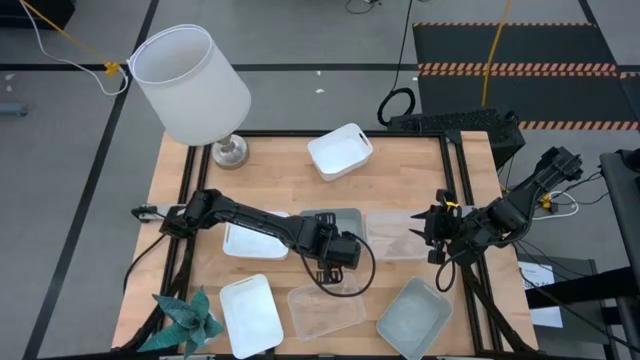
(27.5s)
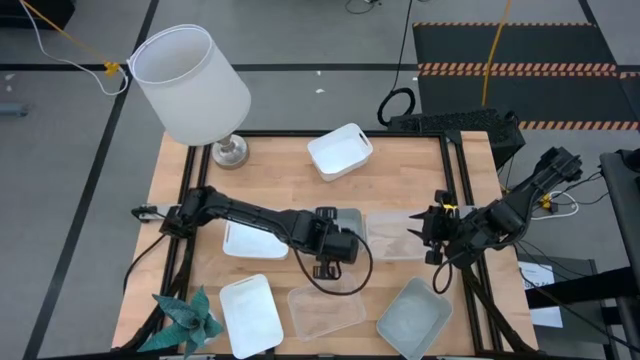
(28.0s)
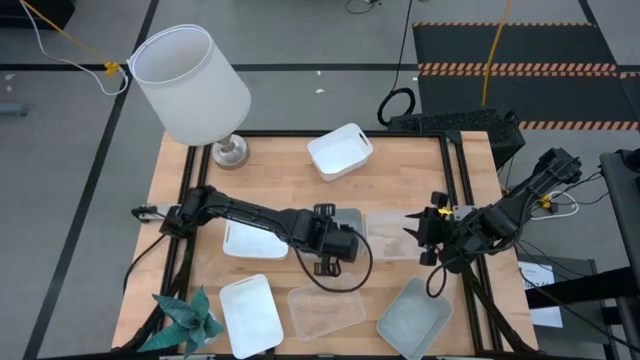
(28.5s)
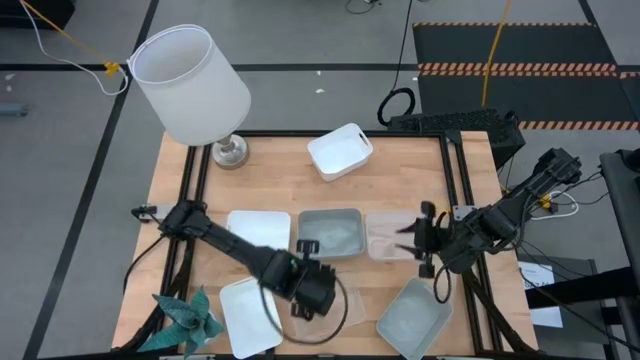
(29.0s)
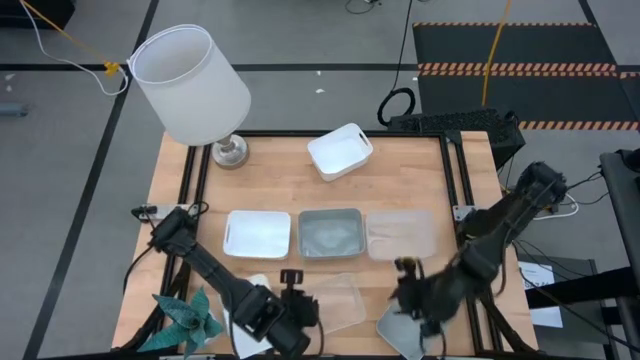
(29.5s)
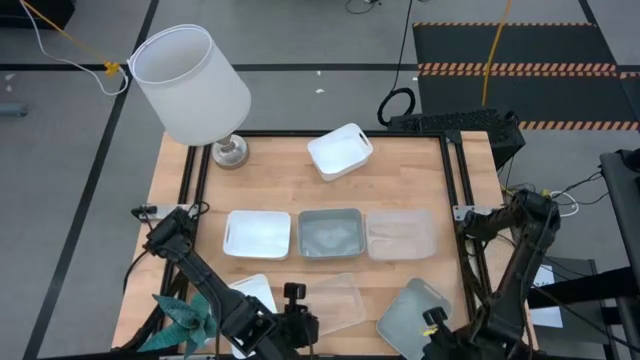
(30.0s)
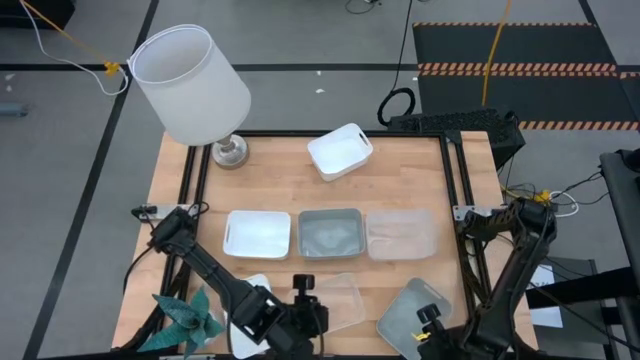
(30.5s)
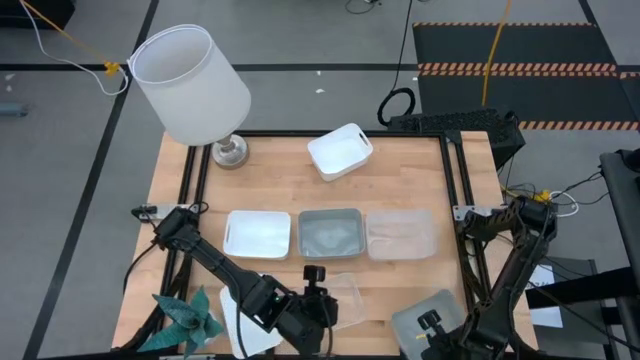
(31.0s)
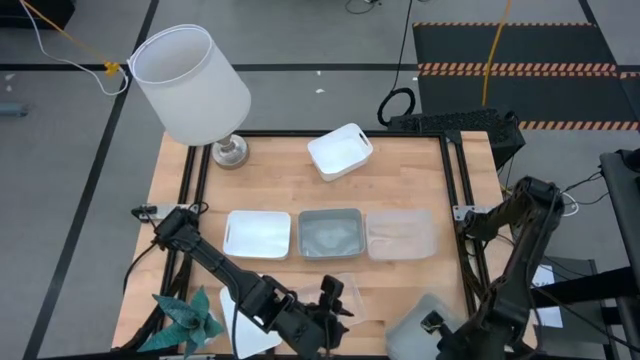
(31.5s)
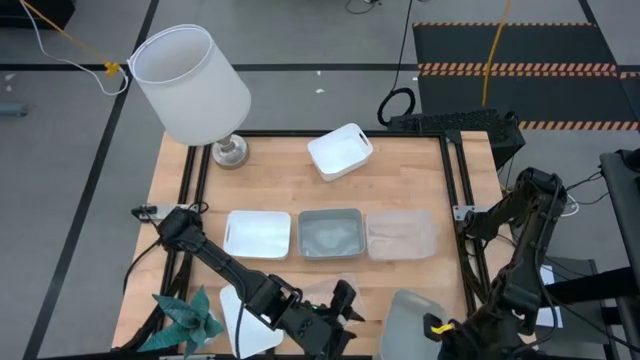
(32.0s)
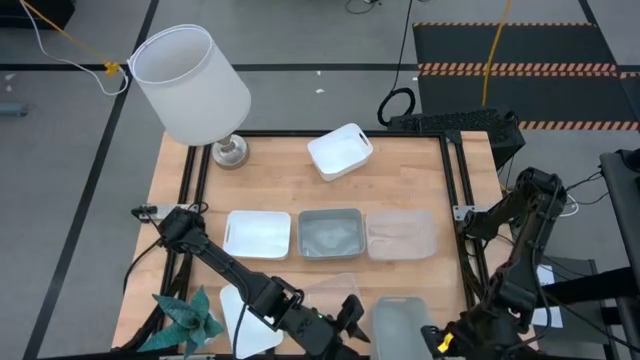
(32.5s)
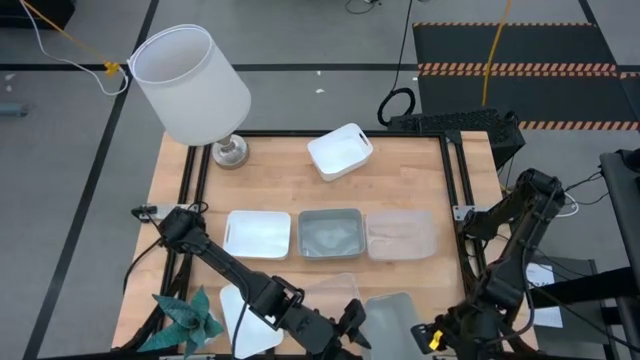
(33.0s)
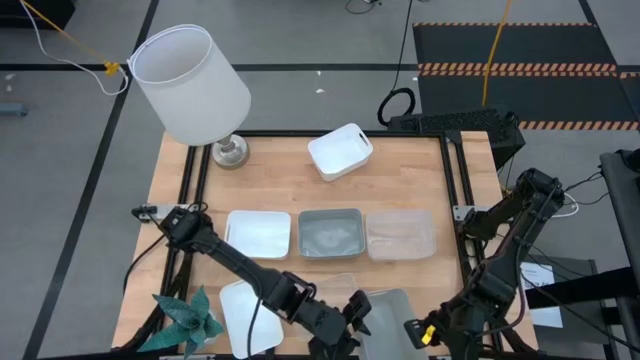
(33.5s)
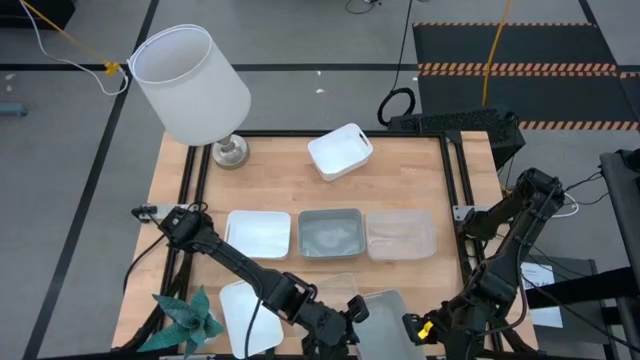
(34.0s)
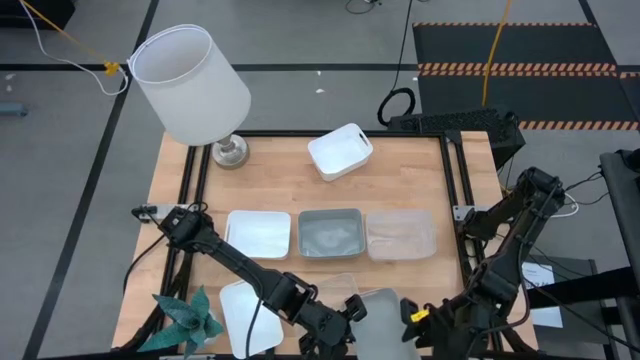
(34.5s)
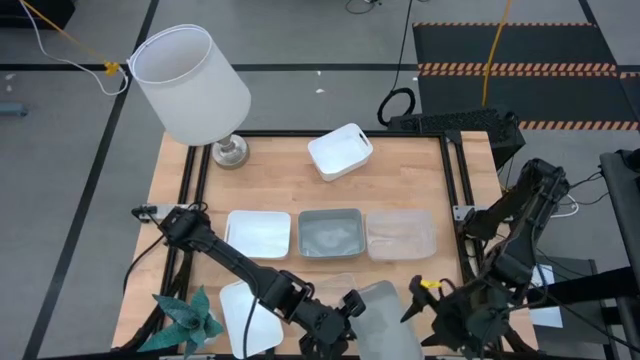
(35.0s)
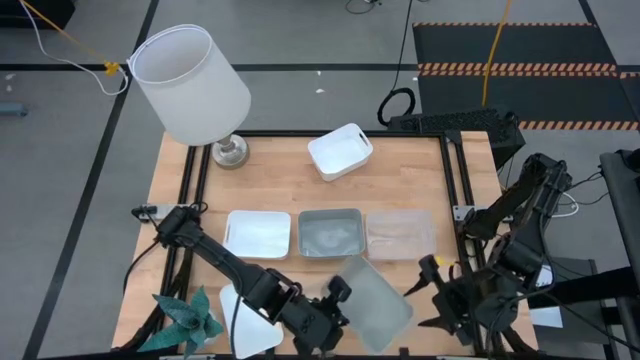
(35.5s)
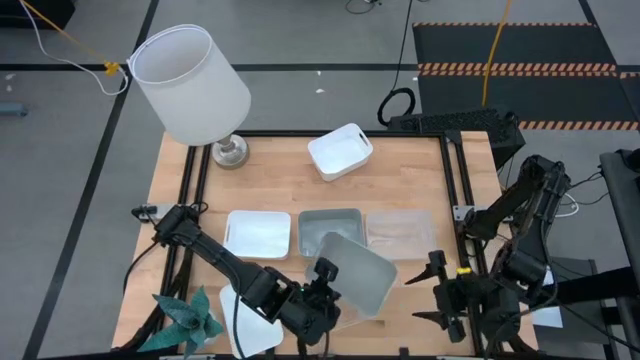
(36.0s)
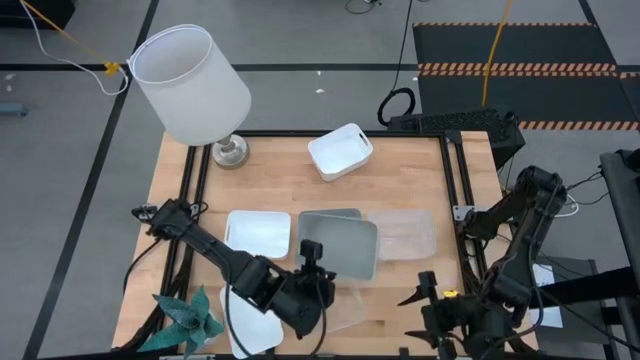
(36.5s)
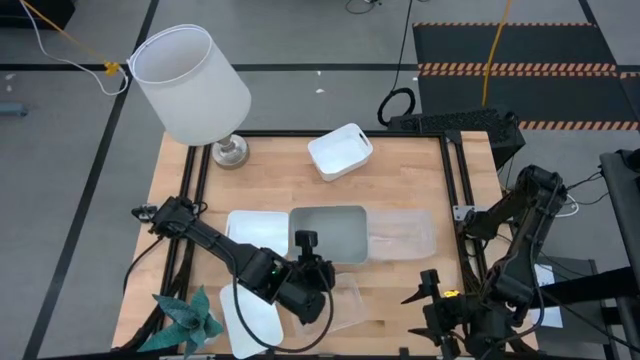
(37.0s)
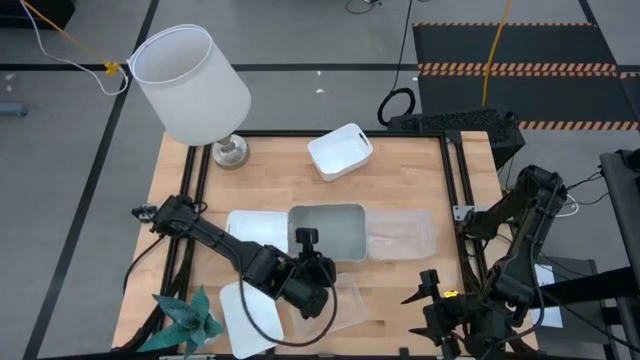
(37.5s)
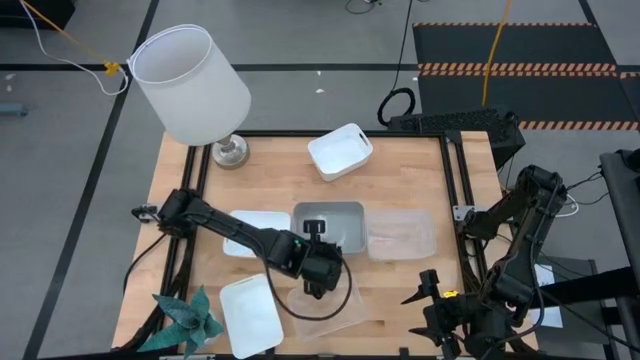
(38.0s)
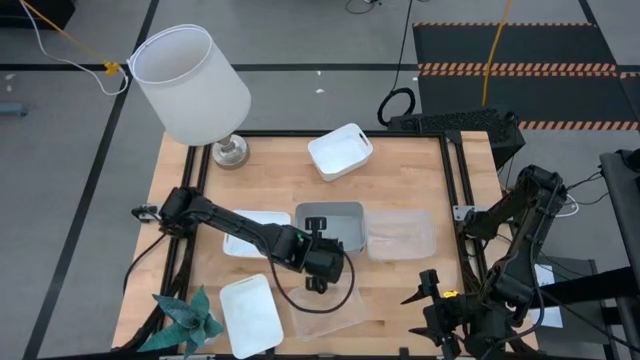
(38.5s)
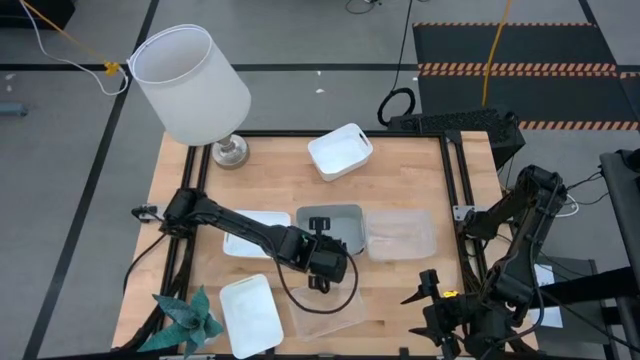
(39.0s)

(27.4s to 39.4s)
Stack the bottom gray bin on the top stacked gray bins

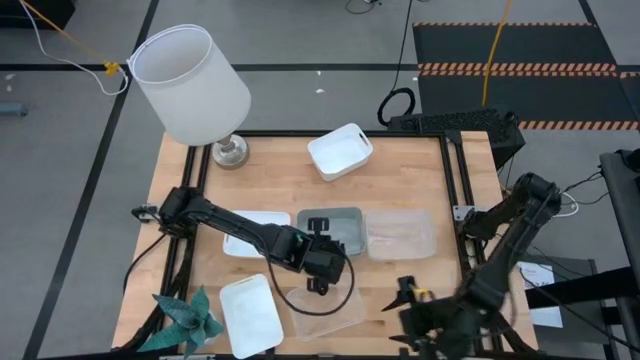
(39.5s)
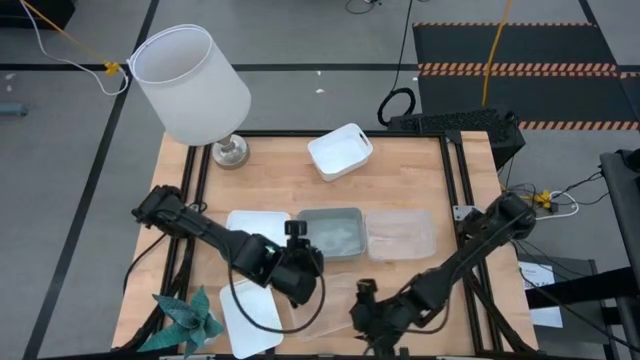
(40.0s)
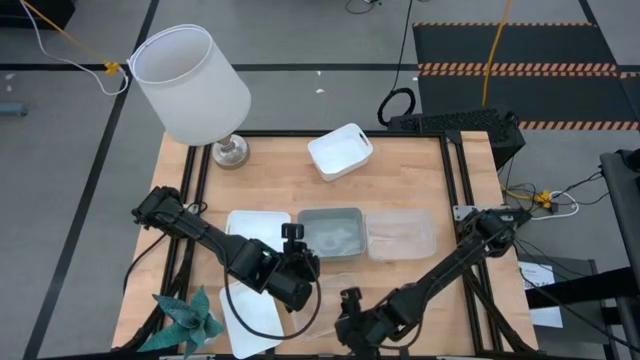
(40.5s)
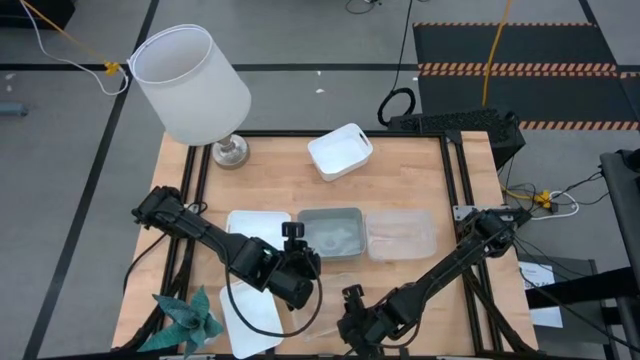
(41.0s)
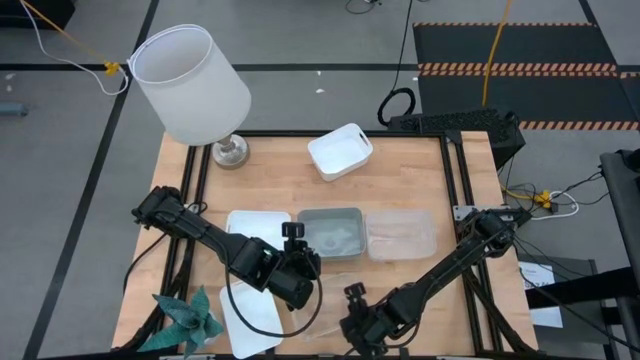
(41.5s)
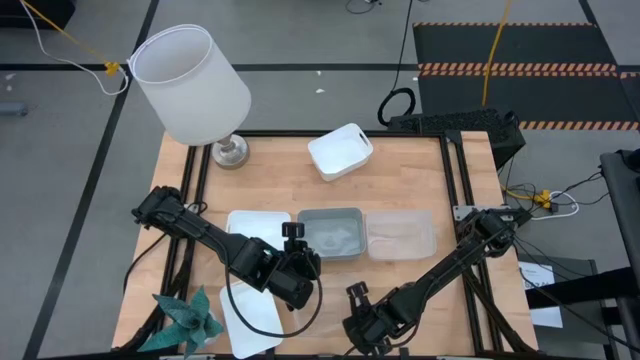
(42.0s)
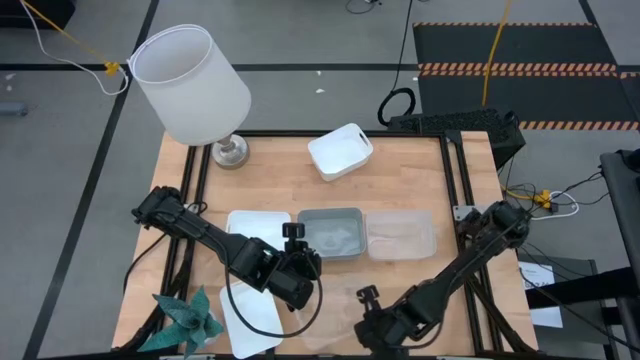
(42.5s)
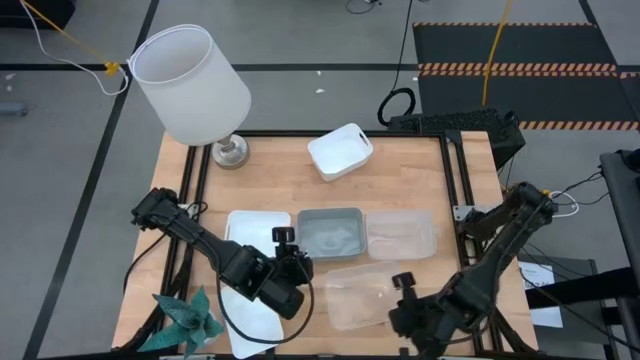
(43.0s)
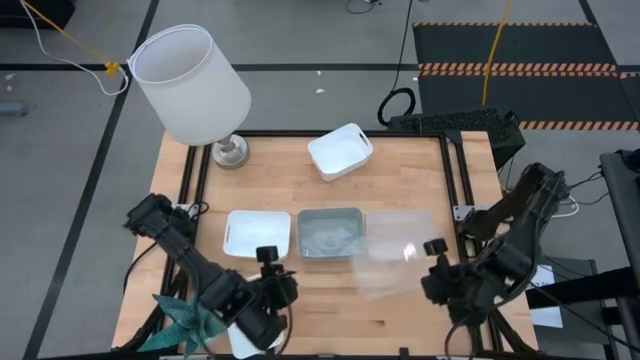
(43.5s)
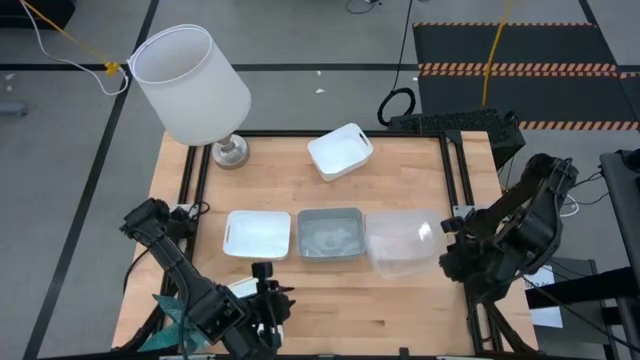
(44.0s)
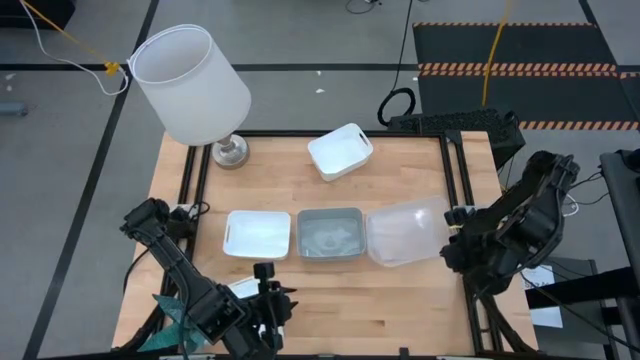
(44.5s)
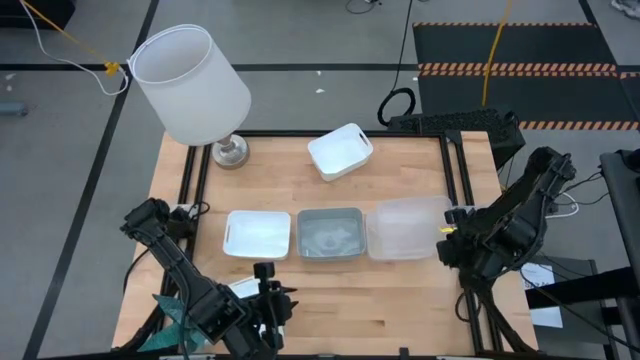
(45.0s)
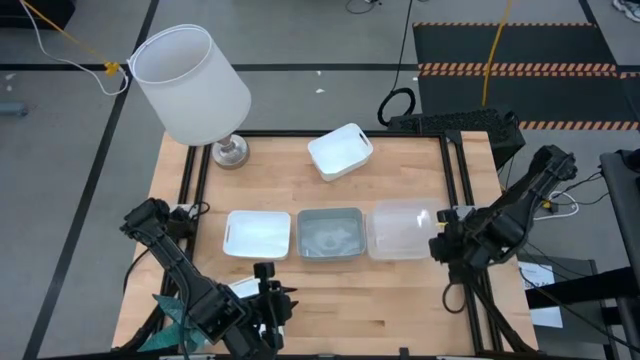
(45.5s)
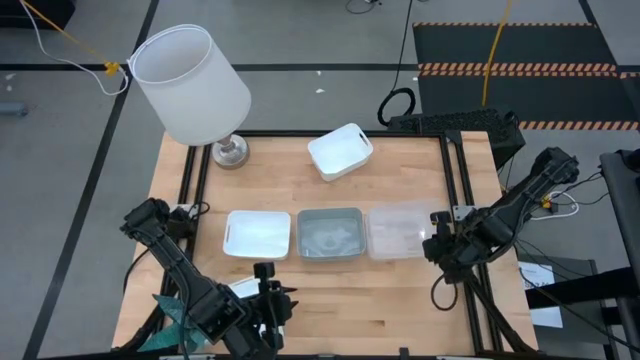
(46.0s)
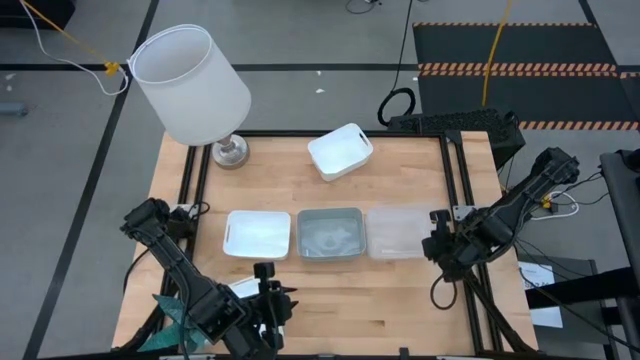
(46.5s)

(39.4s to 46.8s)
Stack the bottom transparent bin on the top stacked transparent bins

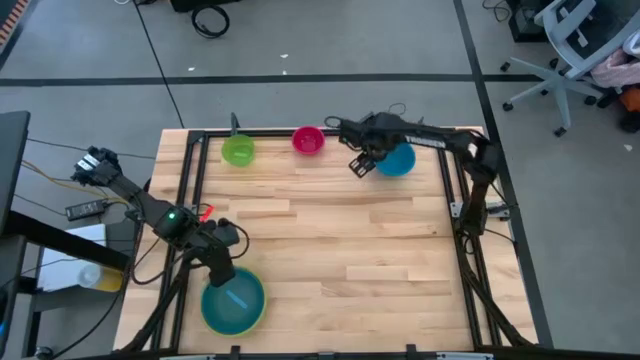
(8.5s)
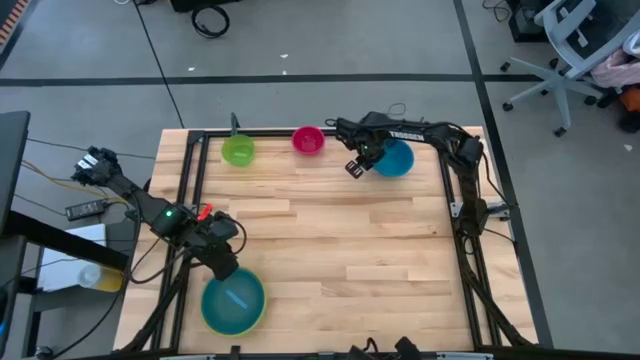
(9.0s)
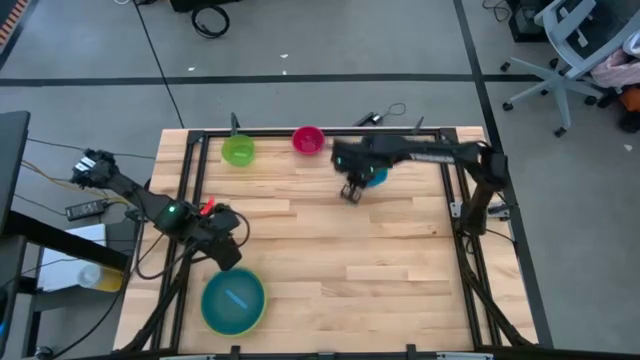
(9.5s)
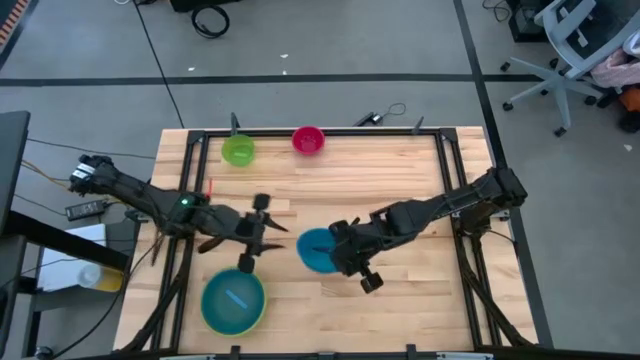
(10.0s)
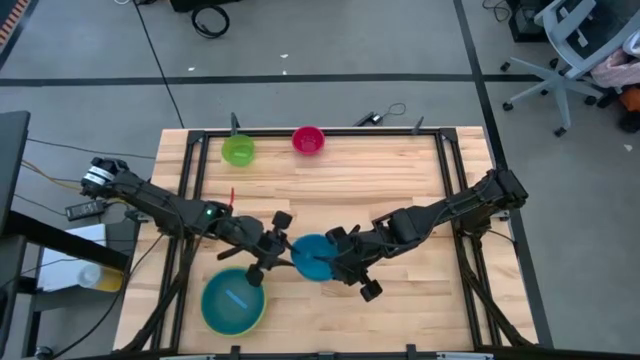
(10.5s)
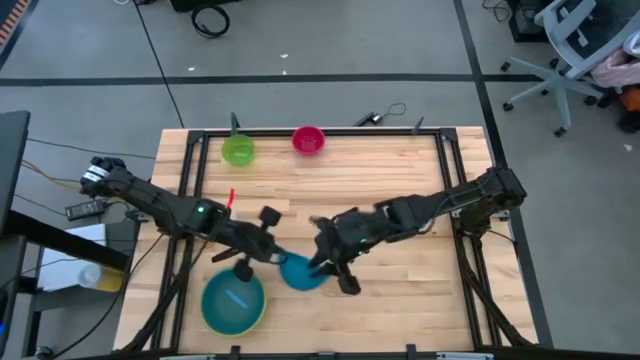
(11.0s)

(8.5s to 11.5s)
Stack the blue bowl on top of the light blue bowl
